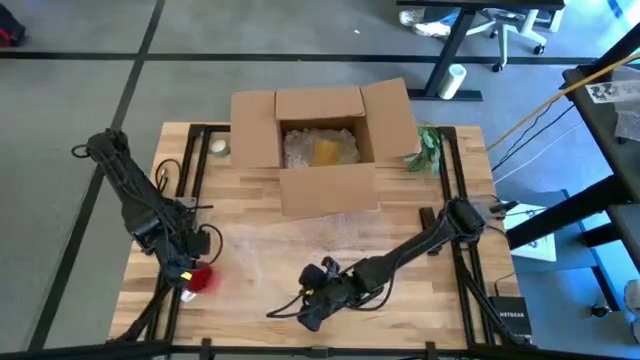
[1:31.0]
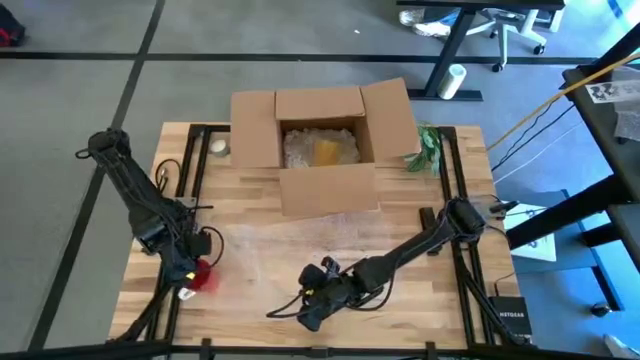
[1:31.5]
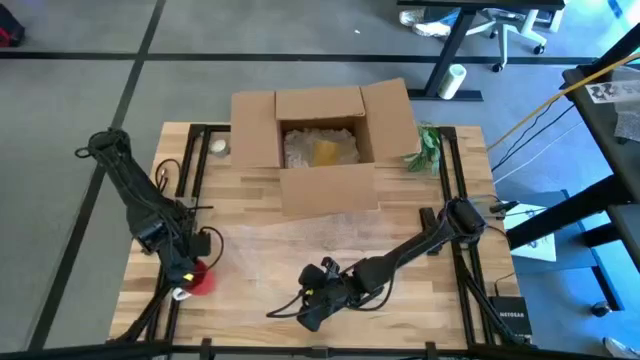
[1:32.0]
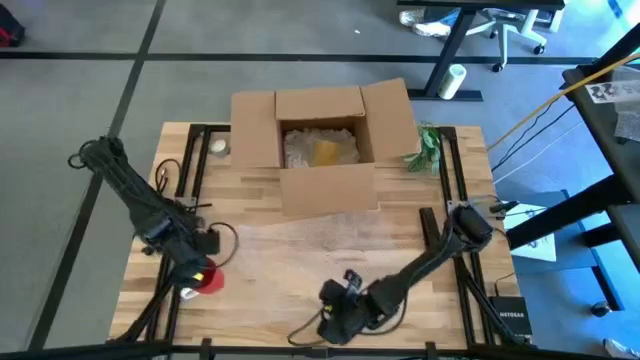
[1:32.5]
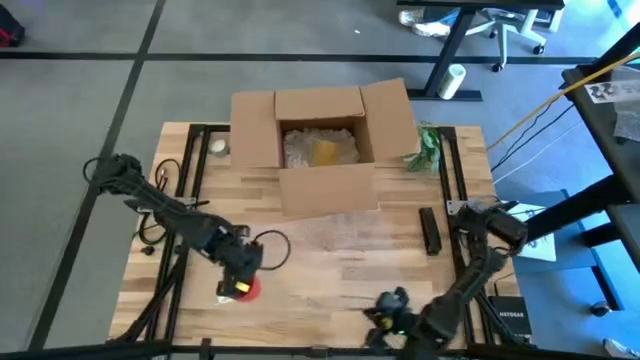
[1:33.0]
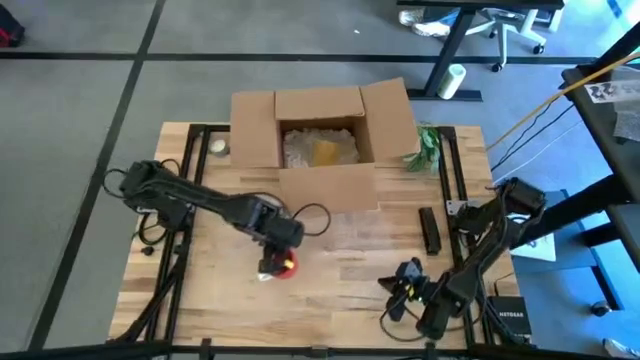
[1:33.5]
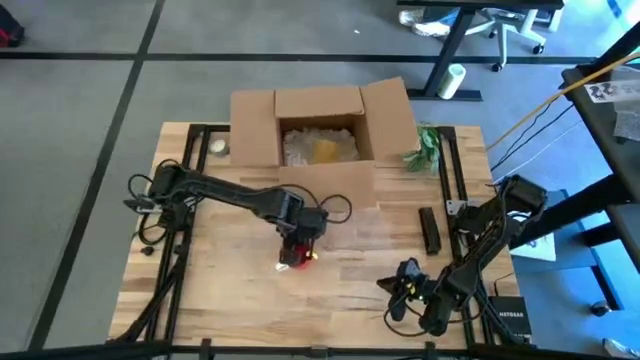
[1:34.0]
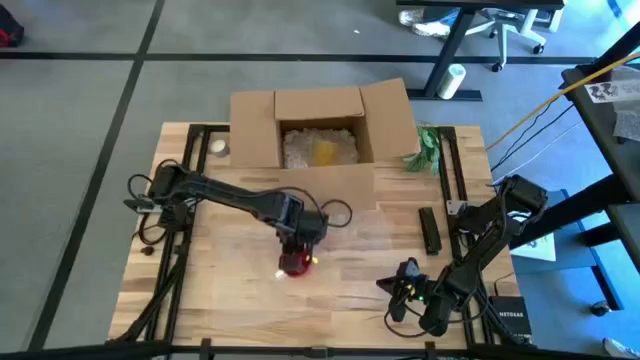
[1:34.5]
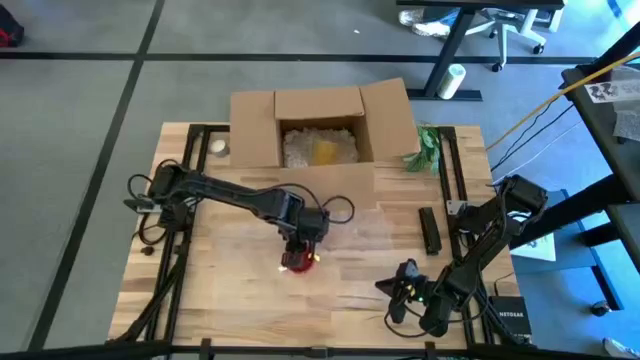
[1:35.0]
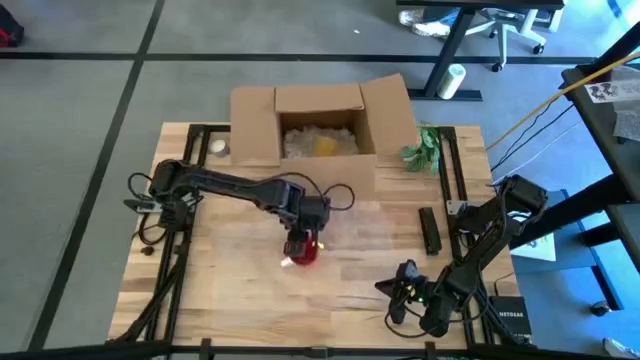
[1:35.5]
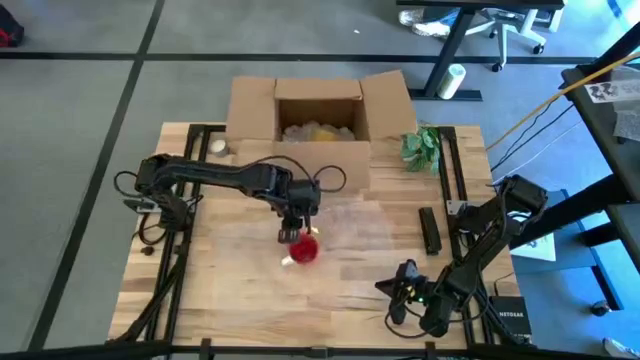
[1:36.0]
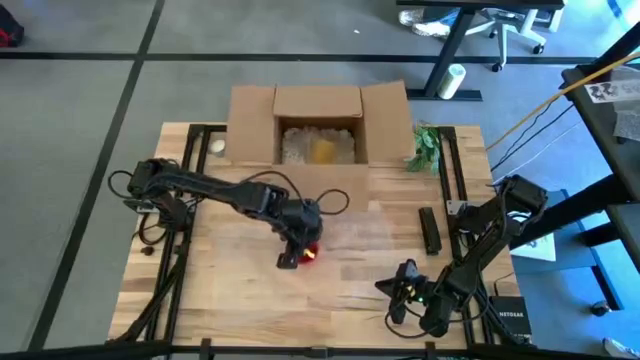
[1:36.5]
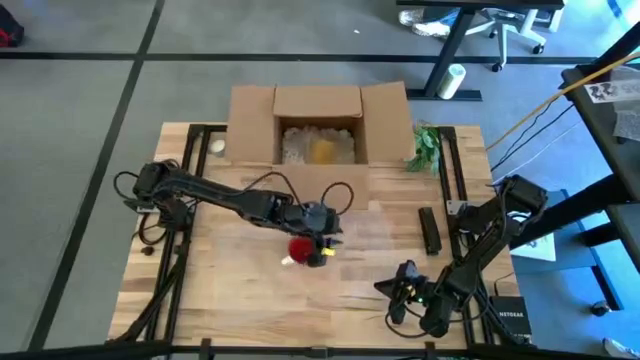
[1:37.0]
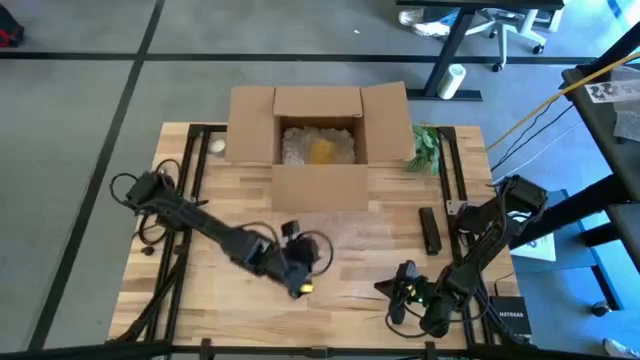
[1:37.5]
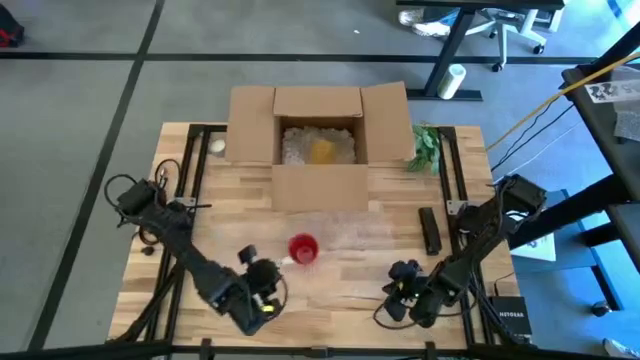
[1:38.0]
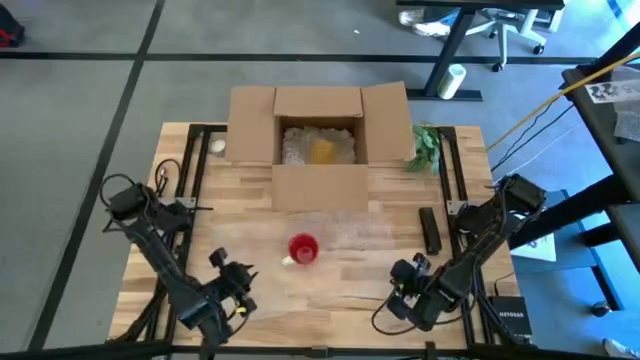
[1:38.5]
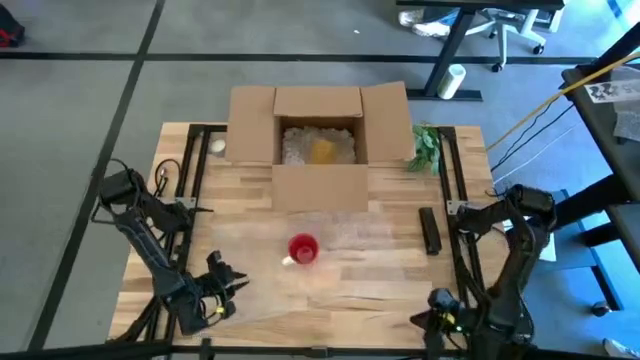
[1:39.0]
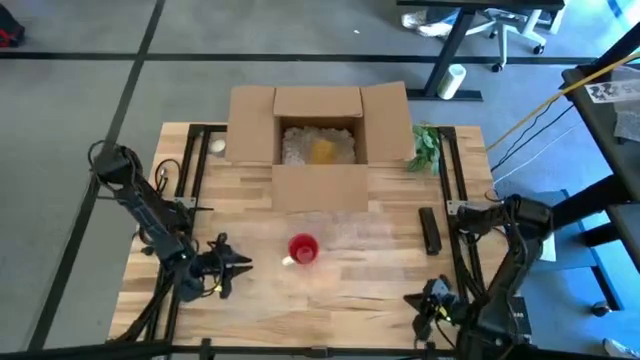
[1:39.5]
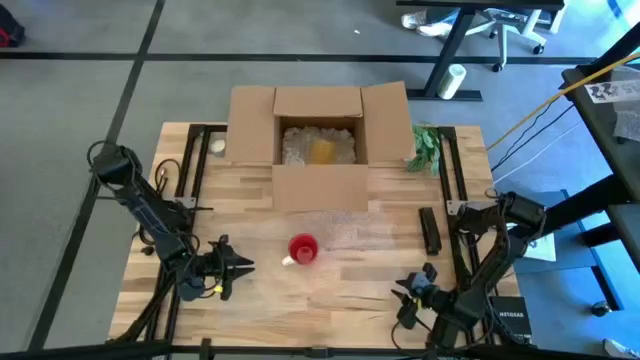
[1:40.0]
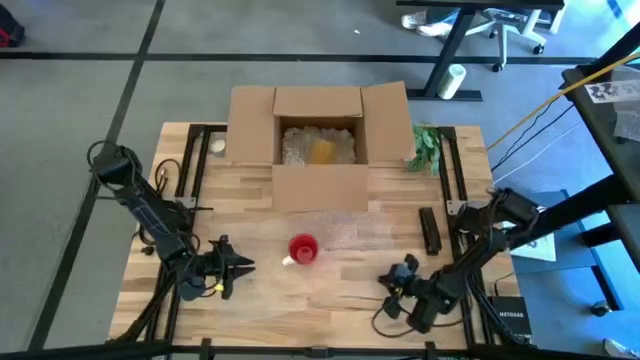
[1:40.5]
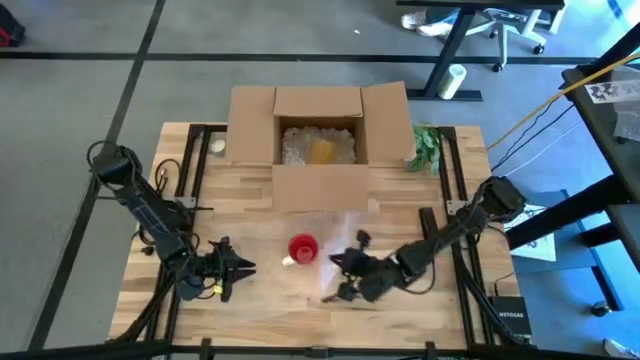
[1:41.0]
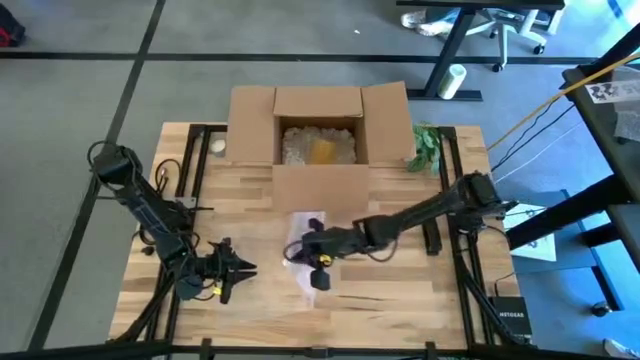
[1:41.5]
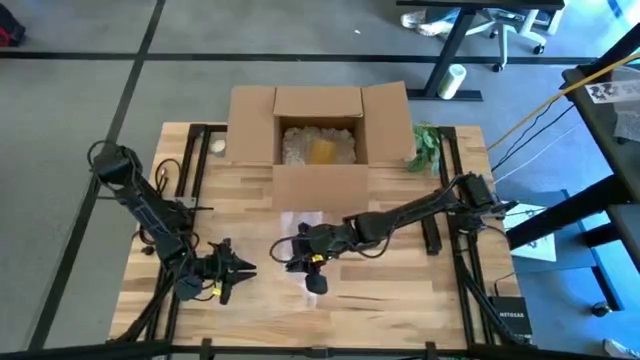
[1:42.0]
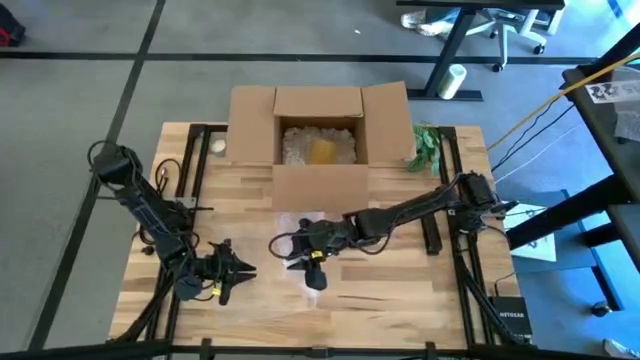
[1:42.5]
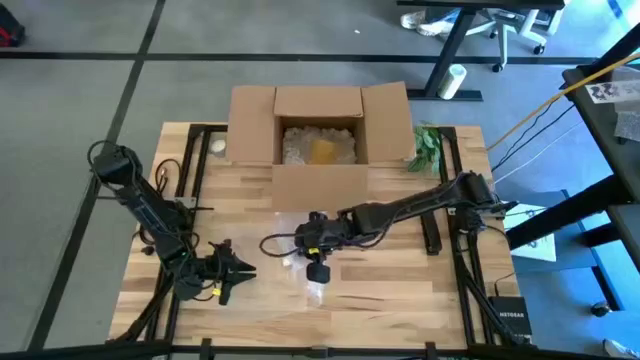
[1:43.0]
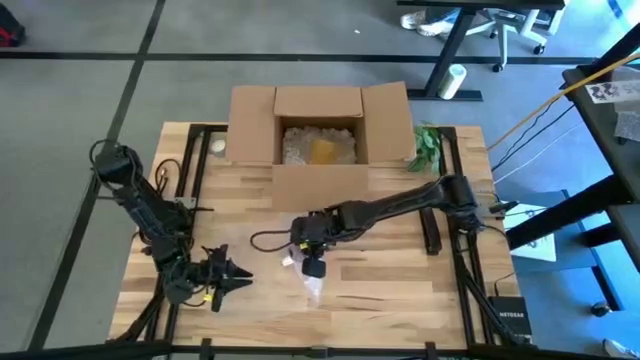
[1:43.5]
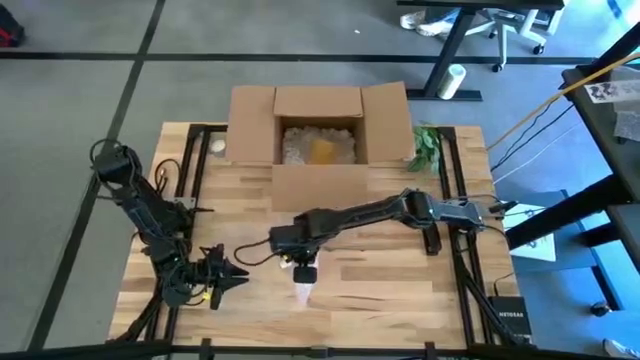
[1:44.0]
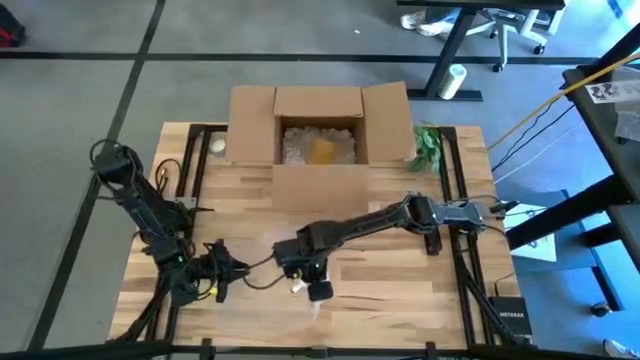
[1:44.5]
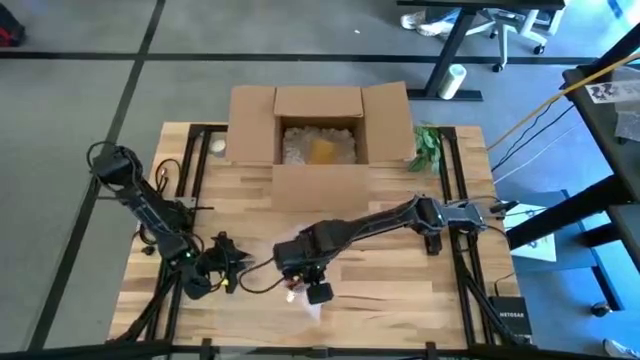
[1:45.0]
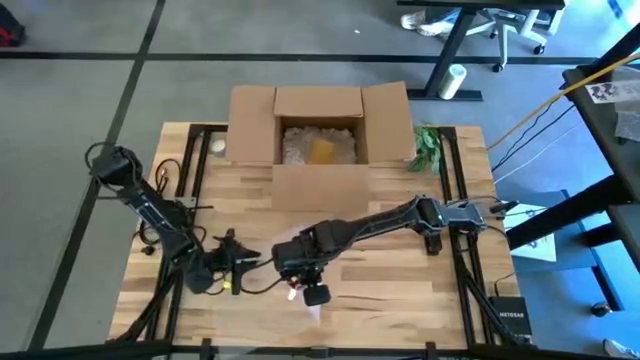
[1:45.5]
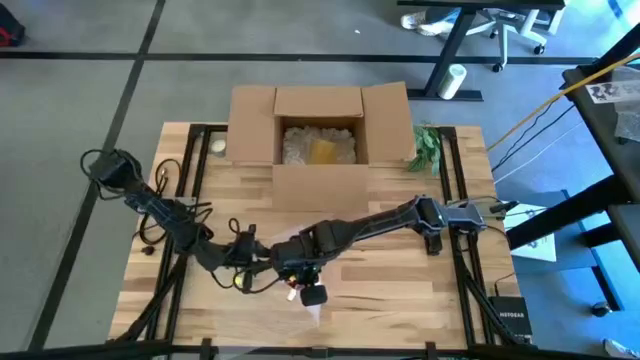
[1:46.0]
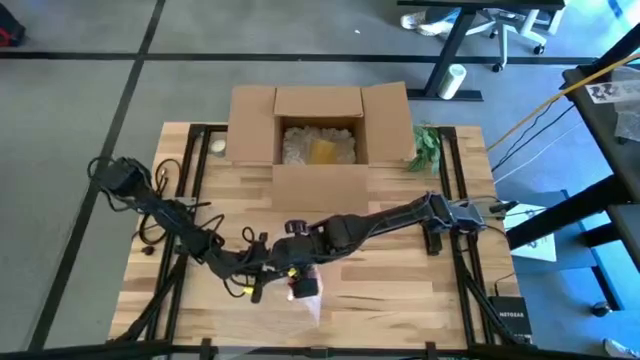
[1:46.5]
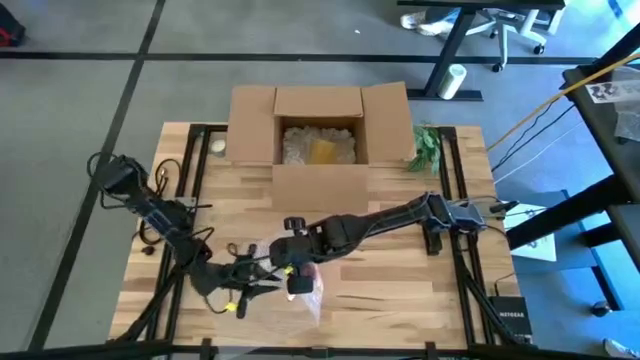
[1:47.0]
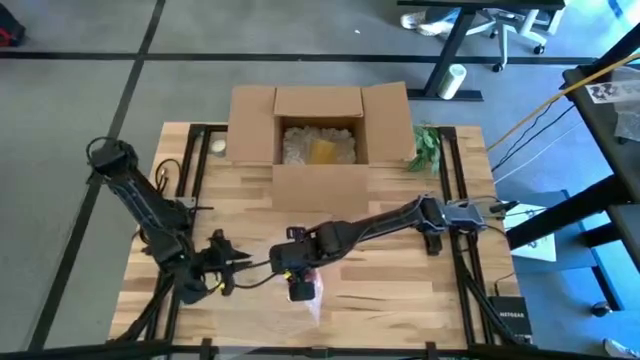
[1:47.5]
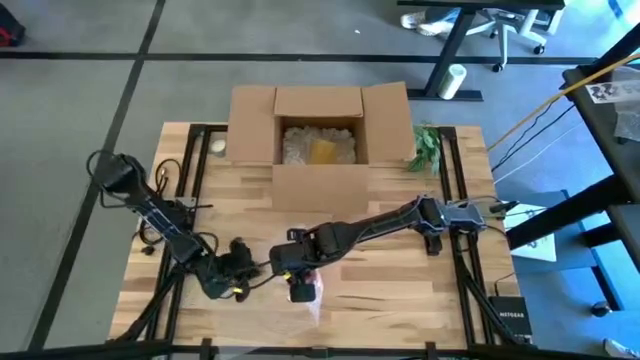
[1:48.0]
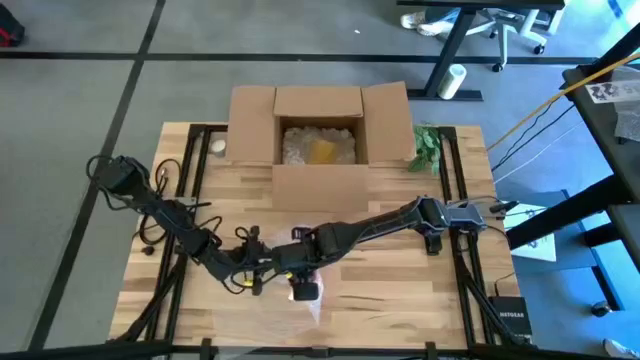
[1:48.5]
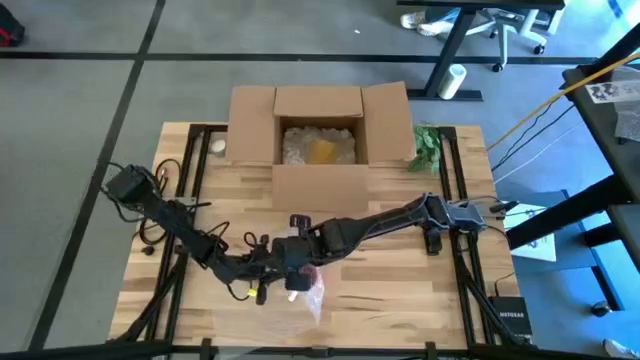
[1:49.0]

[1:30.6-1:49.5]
Task: wrap mug
Wrap the red mug with the transparent bubble wrap

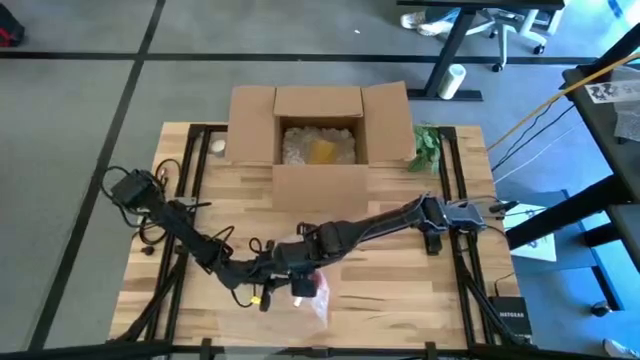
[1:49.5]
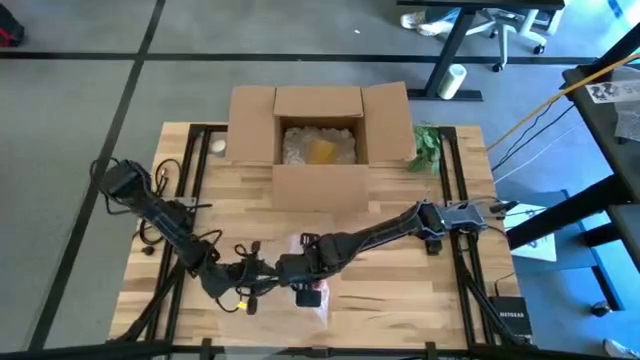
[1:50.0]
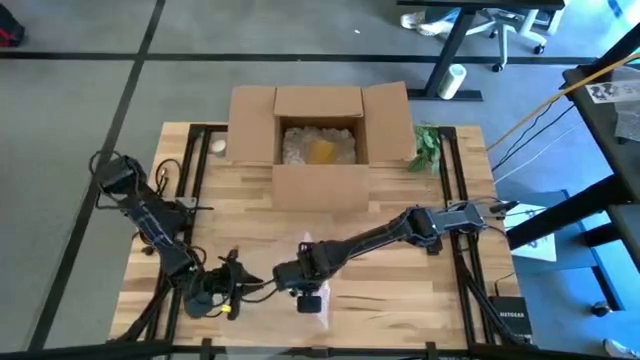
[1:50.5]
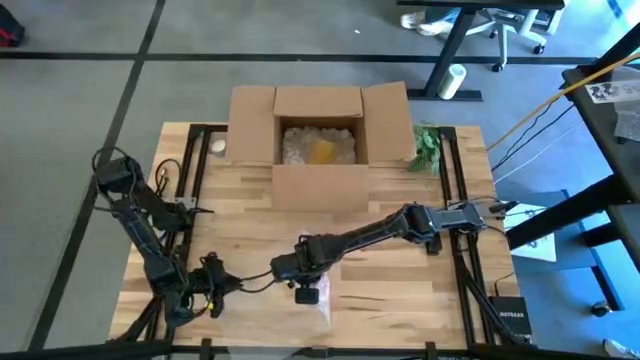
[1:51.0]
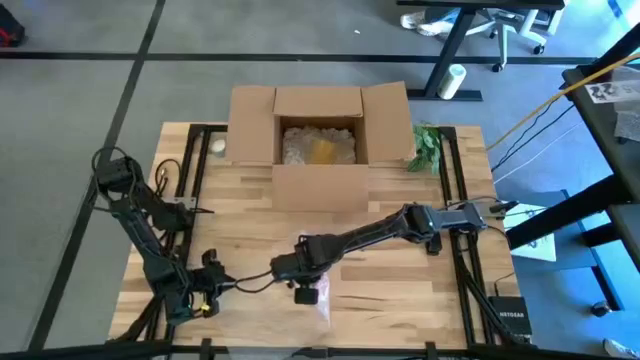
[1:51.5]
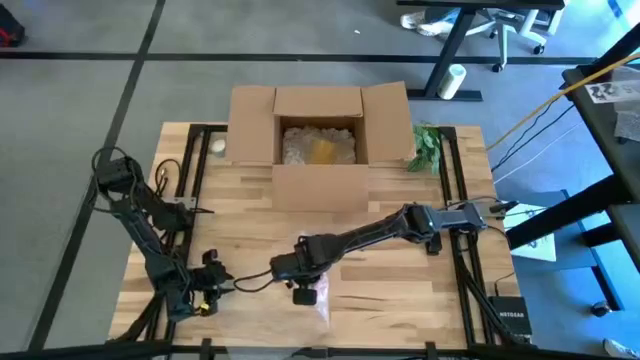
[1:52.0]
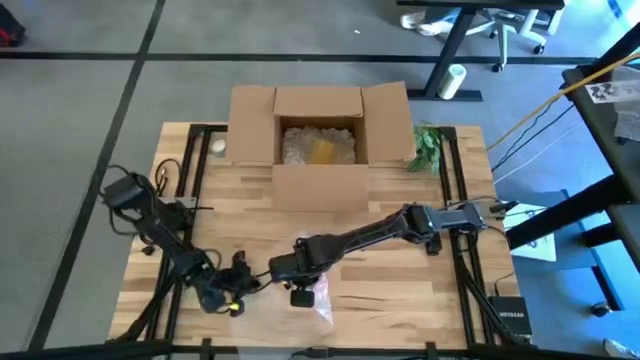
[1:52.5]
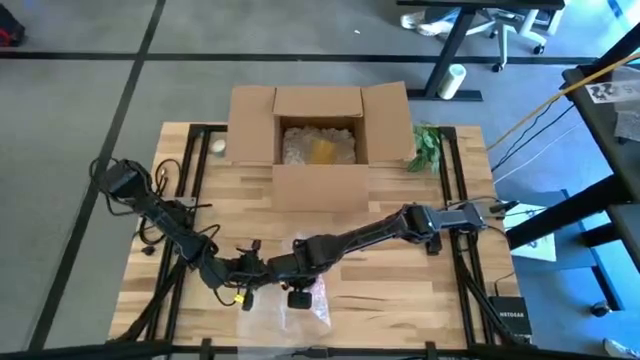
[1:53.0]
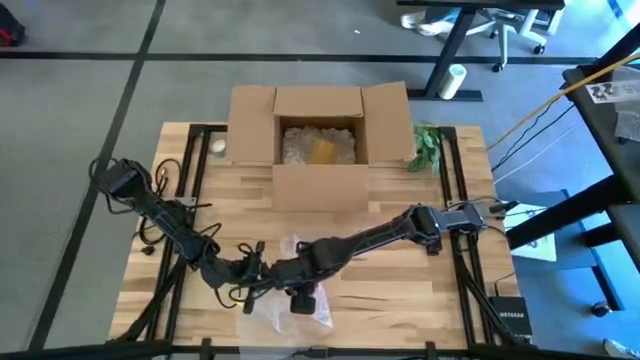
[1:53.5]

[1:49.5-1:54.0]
Wrap the red mug with the transparent bubble wrap
